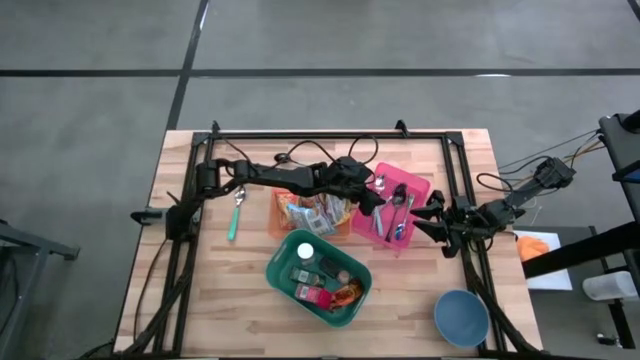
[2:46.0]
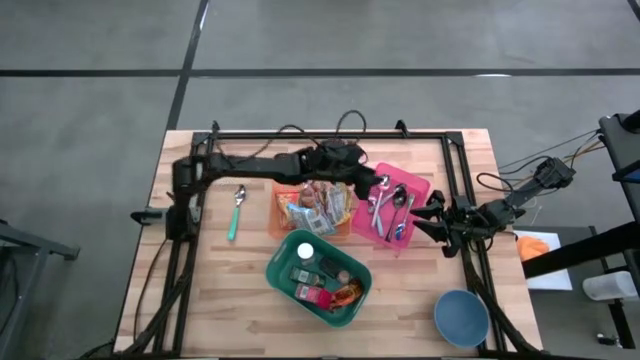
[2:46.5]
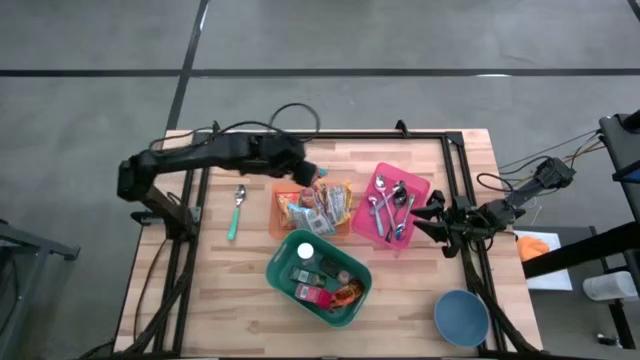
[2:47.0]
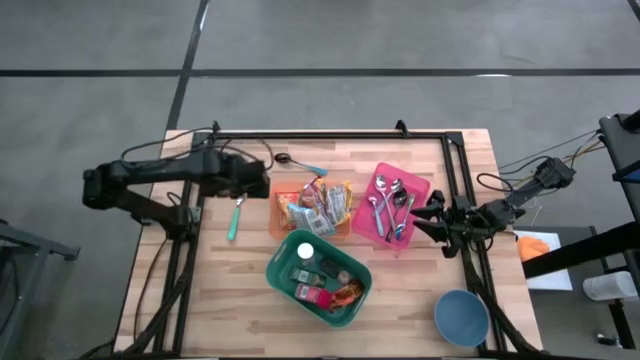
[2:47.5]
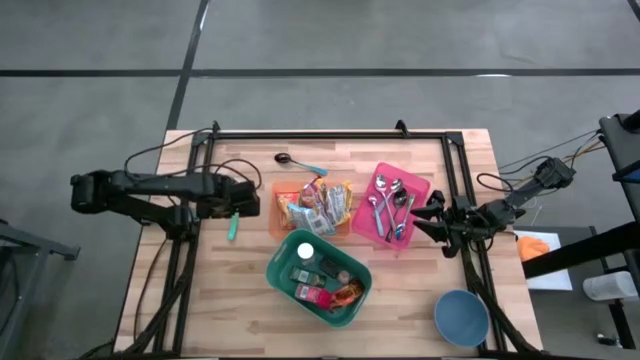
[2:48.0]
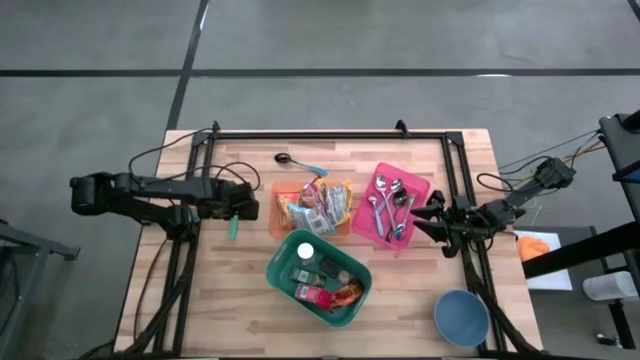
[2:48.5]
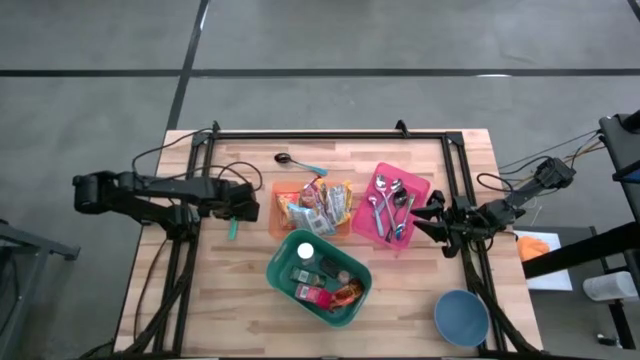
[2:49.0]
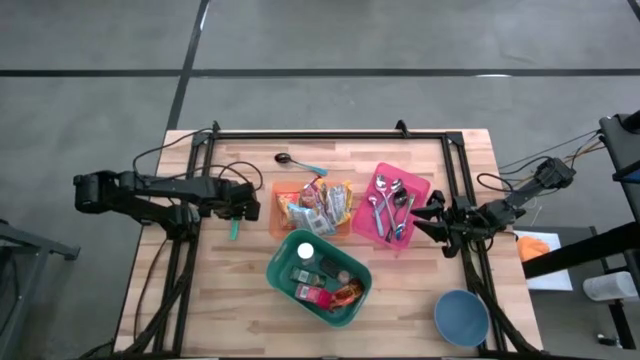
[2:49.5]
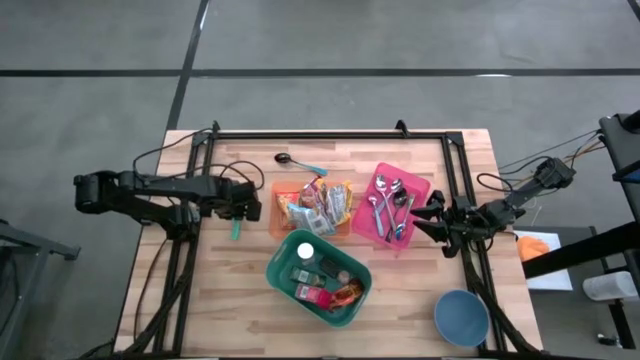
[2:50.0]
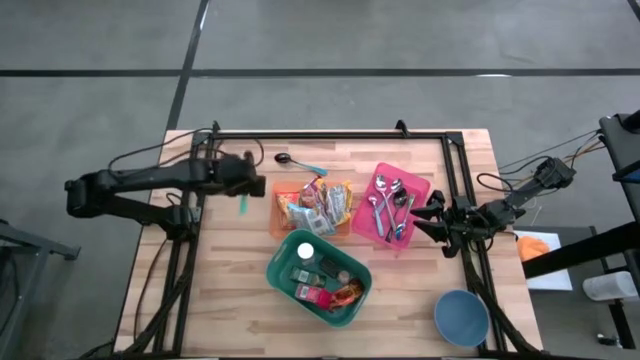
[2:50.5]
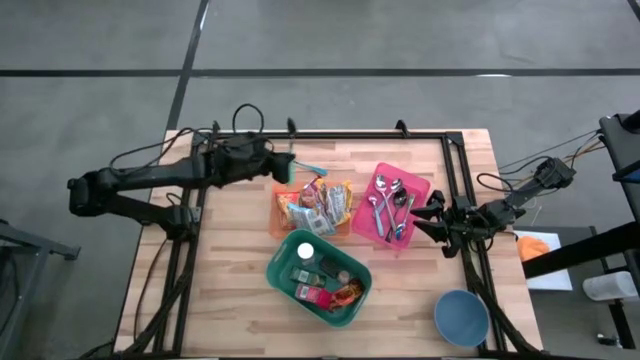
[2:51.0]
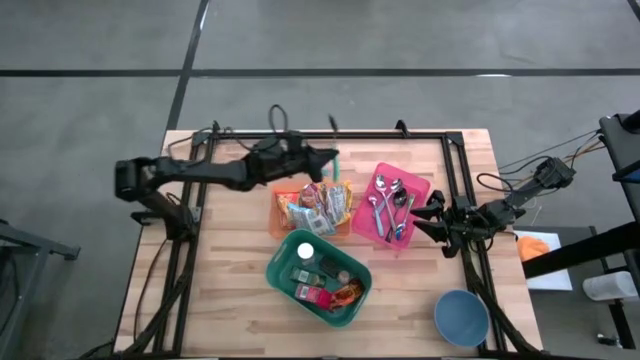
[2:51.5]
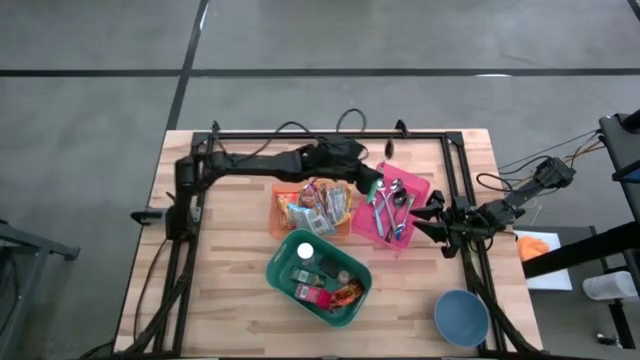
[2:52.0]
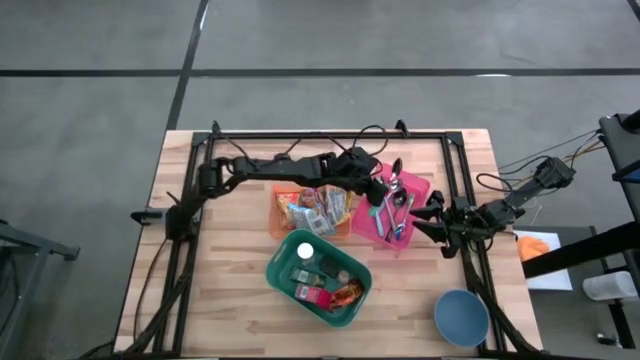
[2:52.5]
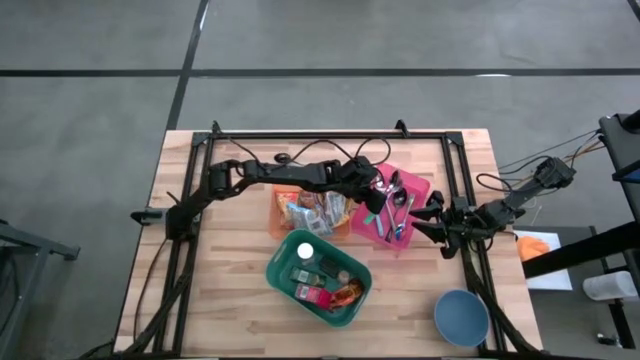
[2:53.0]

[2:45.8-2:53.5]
Put the light blue spoon into the pink bin

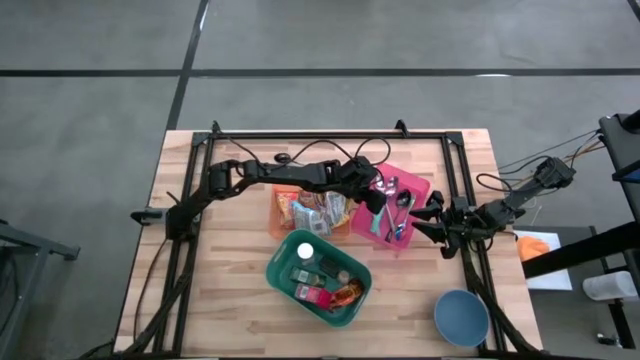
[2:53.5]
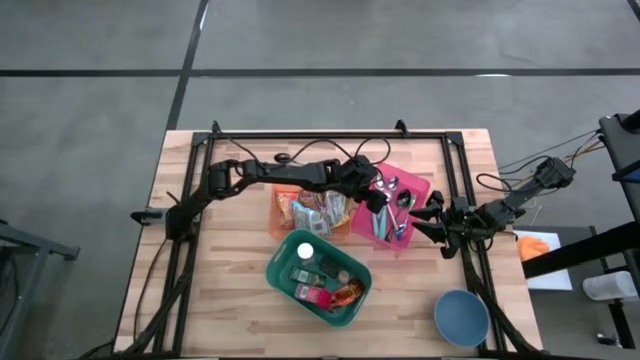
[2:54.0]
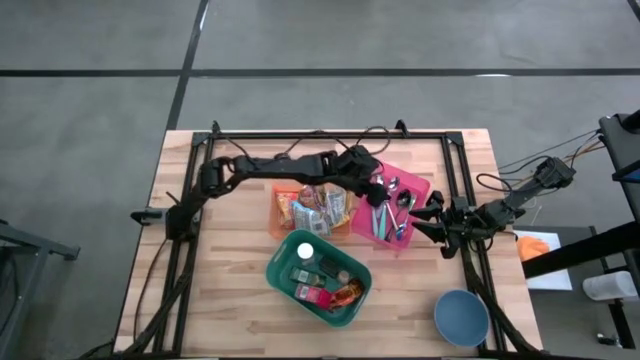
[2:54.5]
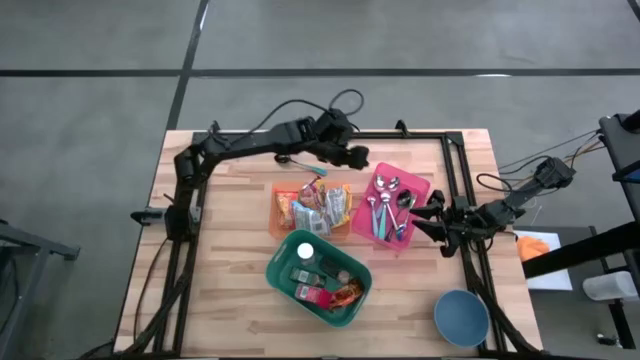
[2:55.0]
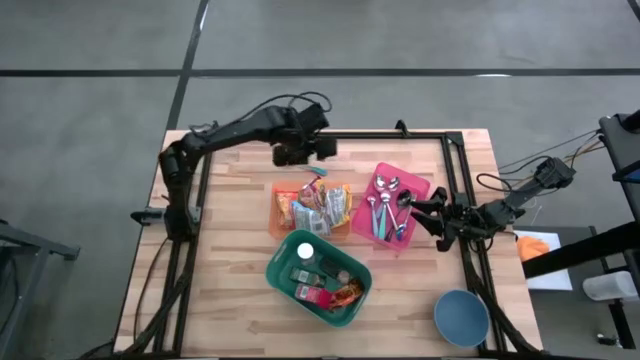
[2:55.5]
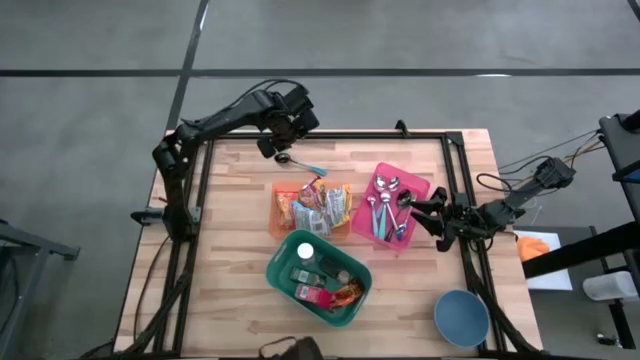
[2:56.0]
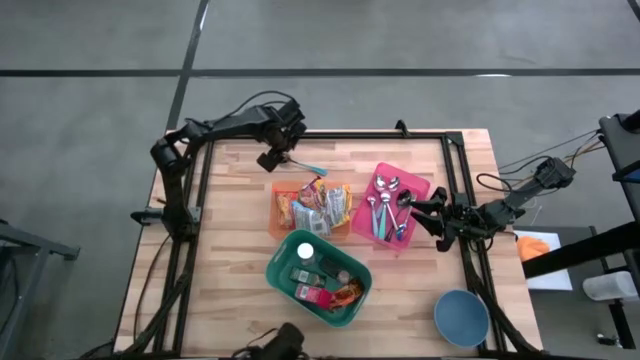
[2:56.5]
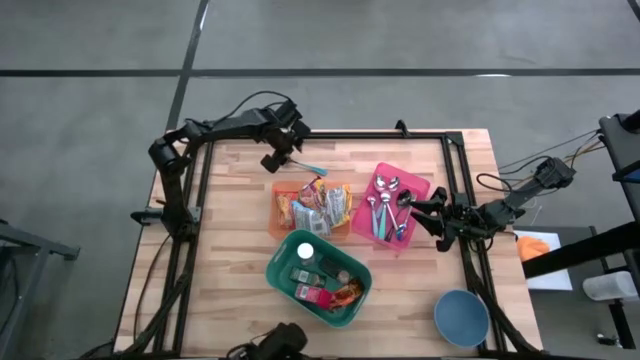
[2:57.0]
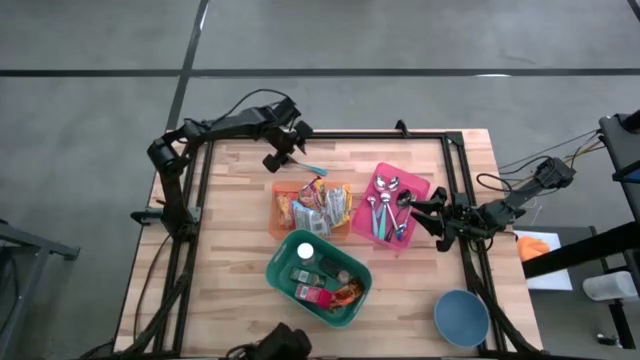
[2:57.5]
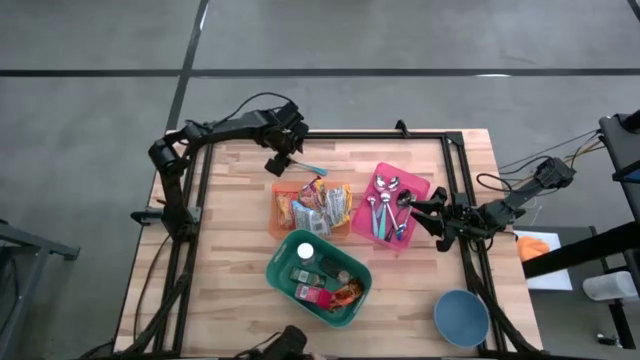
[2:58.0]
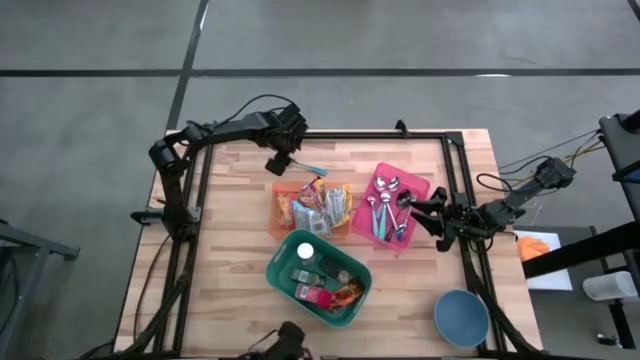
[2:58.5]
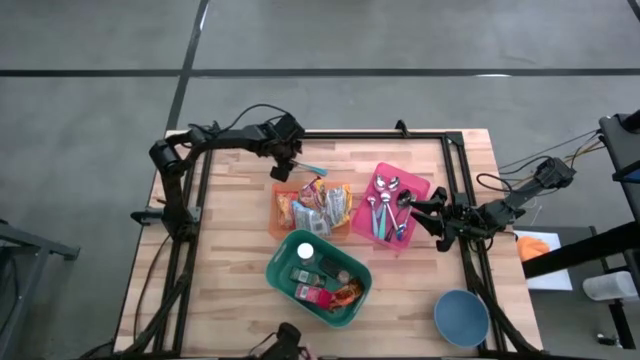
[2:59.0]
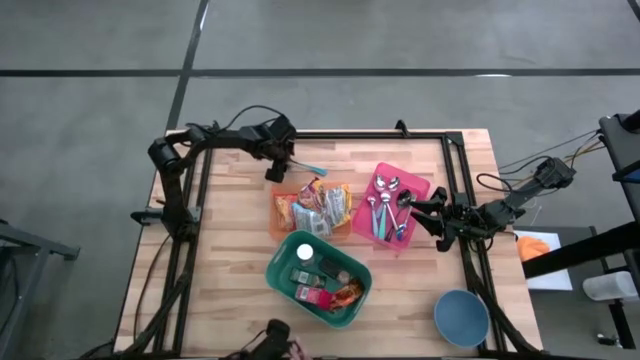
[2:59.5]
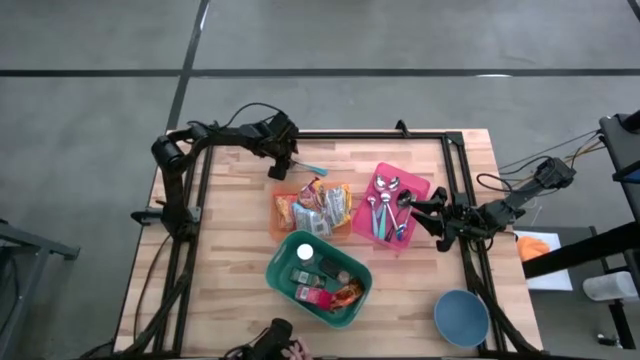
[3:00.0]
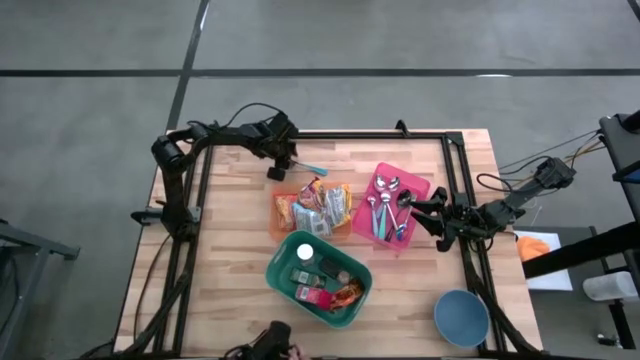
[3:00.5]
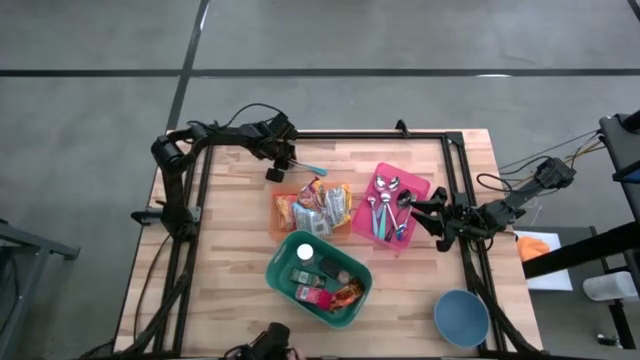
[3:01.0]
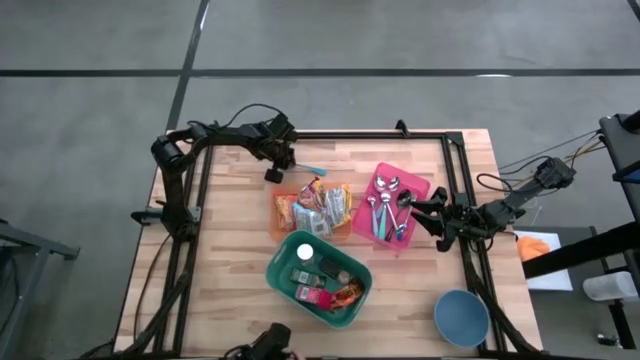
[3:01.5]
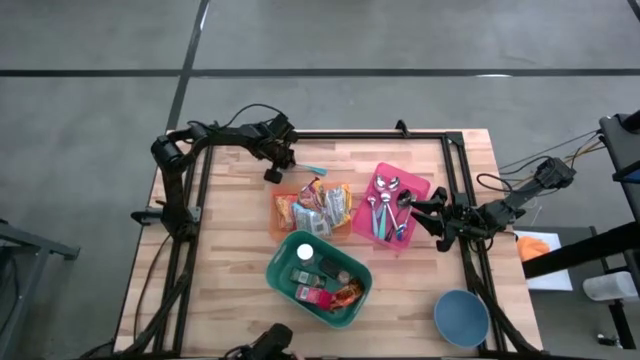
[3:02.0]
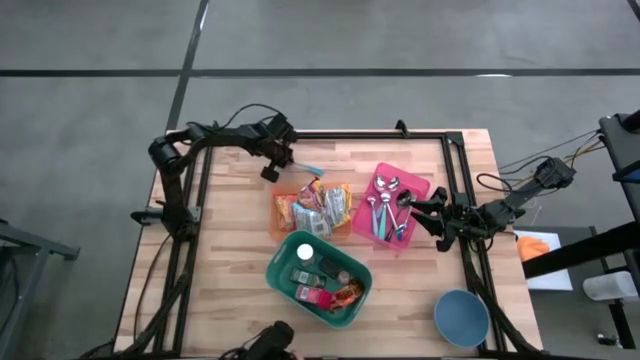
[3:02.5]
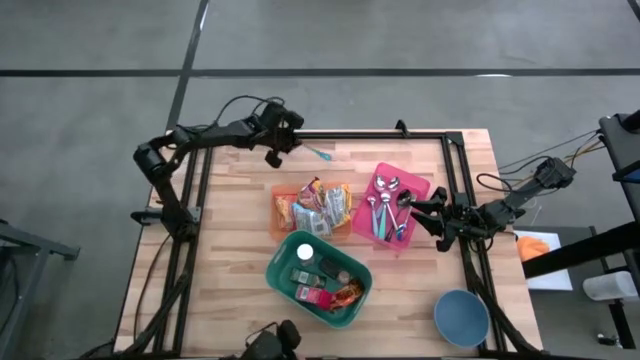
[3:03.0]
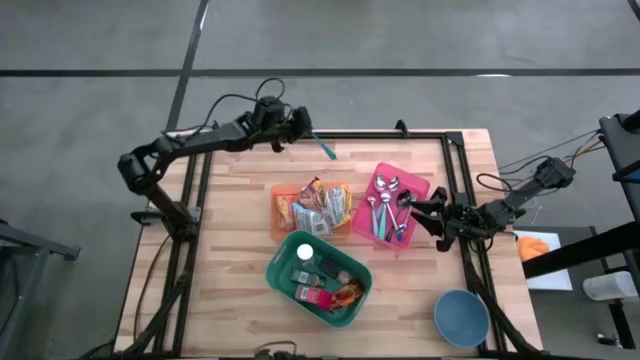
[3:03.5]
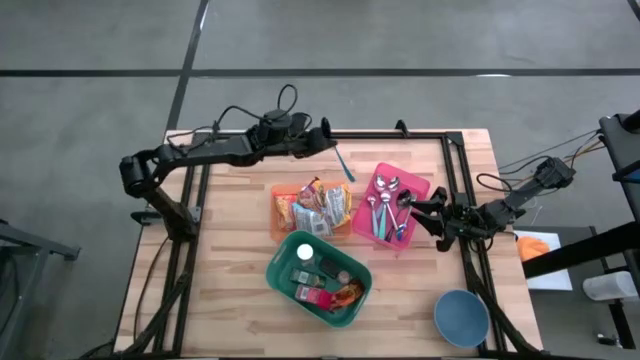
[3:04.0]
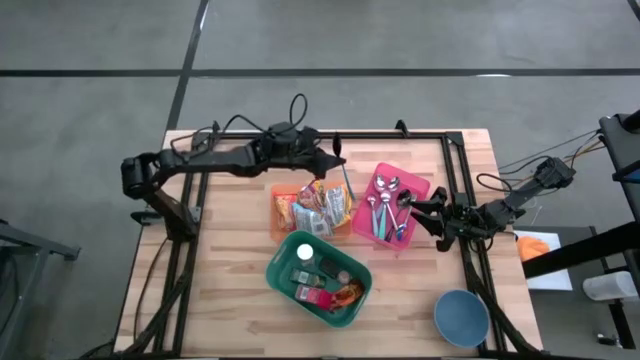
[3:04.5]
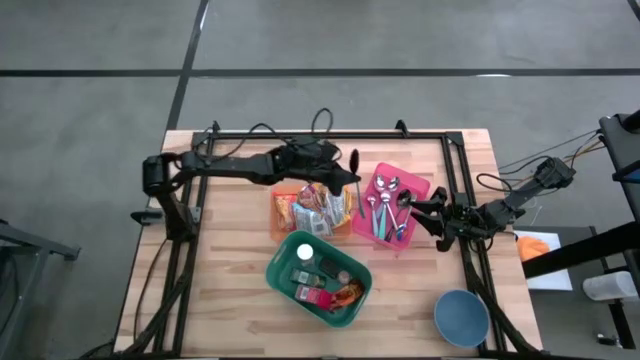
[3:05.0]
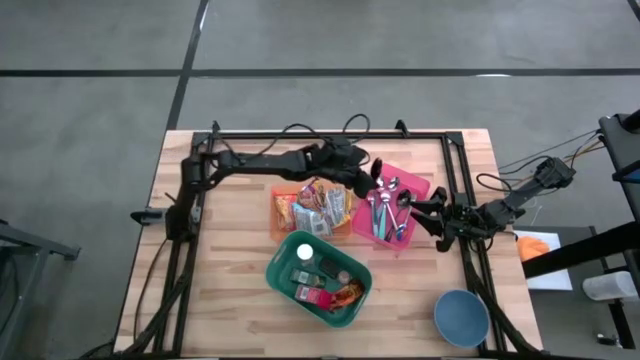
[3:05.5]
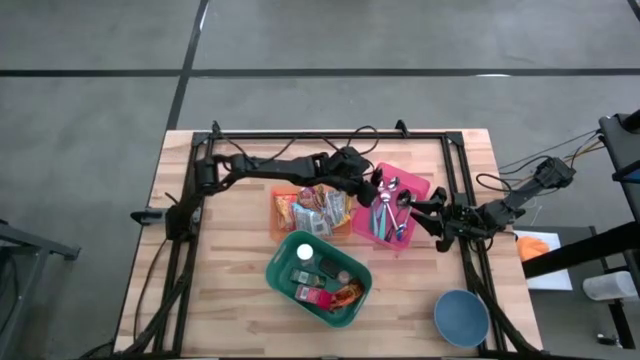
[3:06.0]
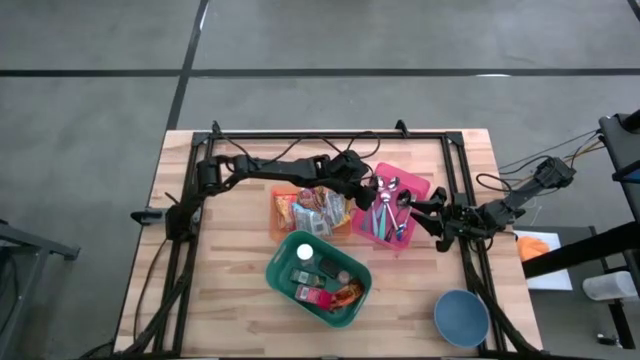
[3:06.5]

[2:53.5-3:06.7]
Put the black and blue spoon into the pink bin
